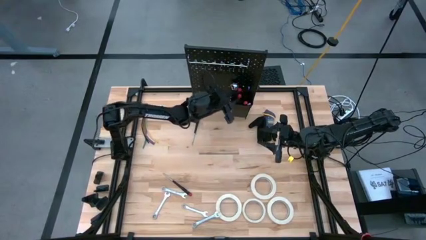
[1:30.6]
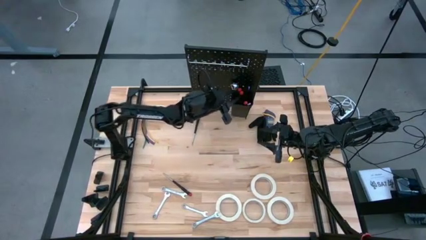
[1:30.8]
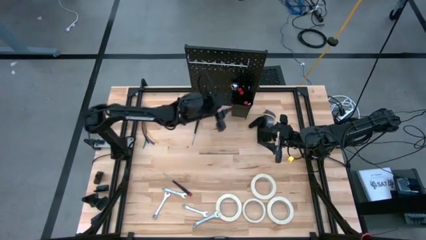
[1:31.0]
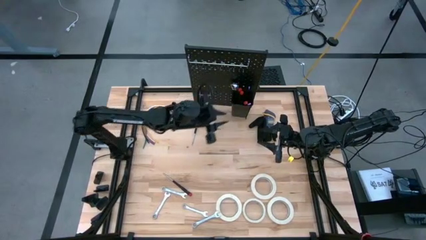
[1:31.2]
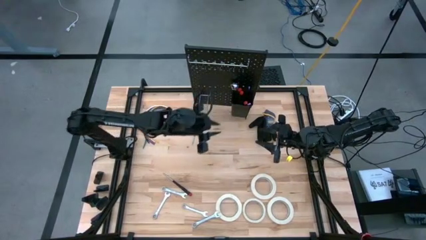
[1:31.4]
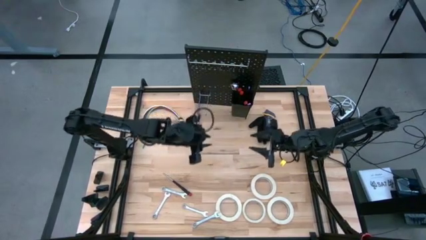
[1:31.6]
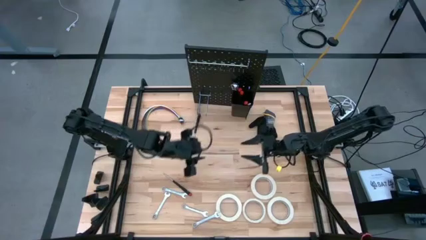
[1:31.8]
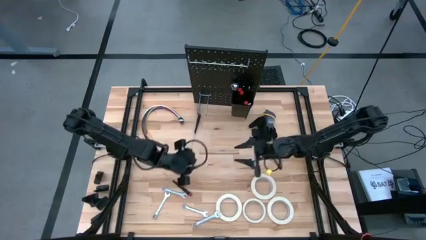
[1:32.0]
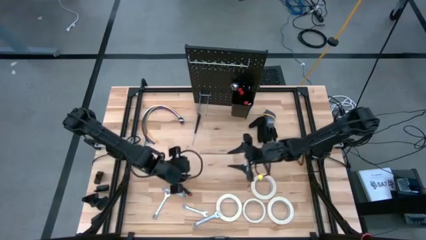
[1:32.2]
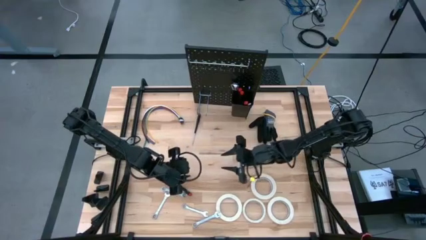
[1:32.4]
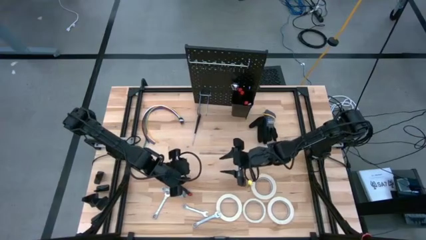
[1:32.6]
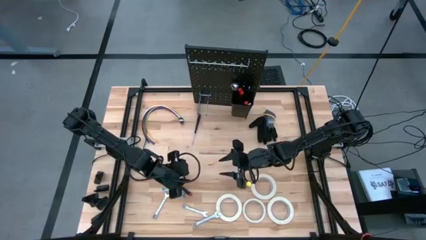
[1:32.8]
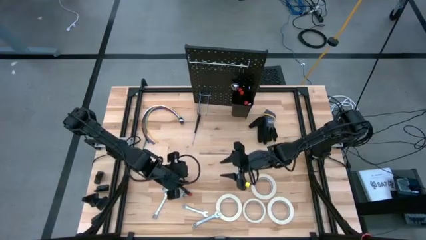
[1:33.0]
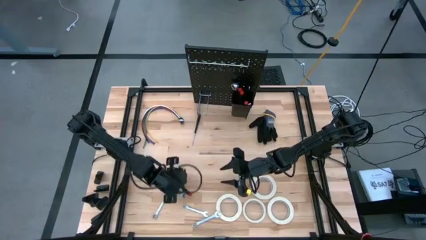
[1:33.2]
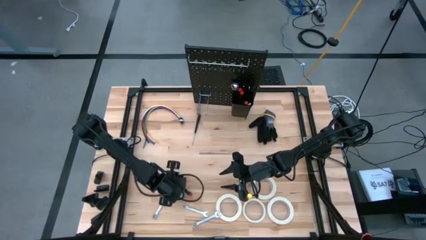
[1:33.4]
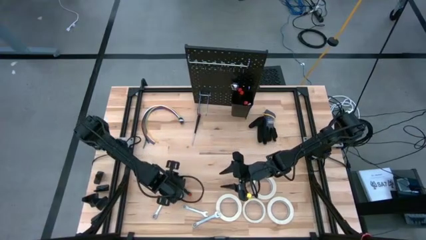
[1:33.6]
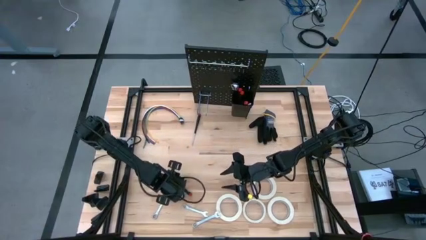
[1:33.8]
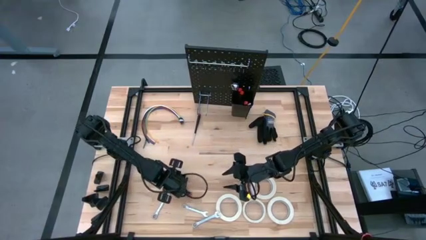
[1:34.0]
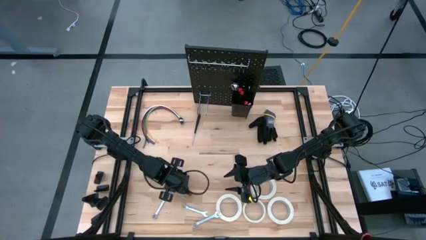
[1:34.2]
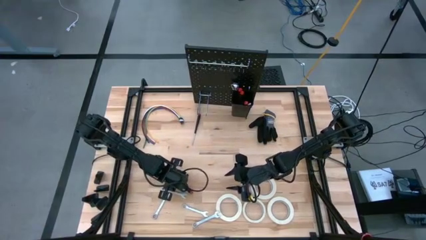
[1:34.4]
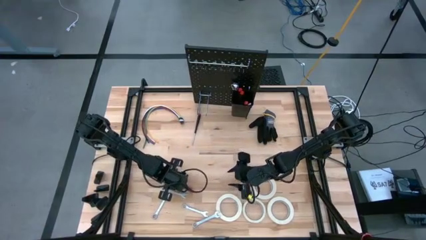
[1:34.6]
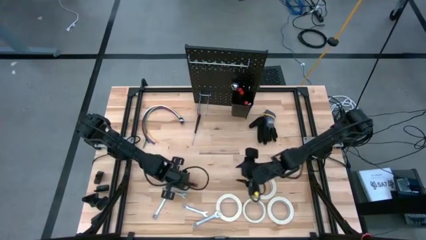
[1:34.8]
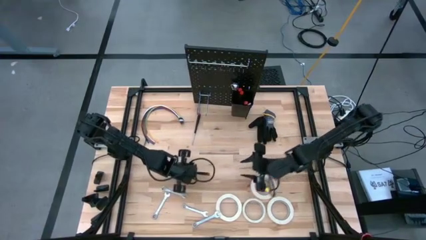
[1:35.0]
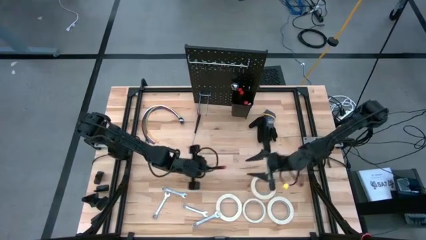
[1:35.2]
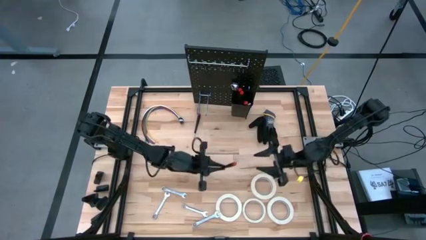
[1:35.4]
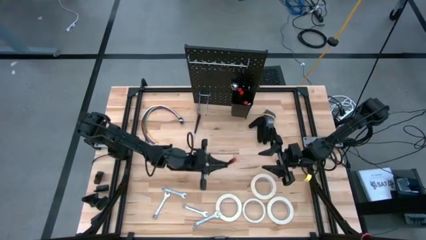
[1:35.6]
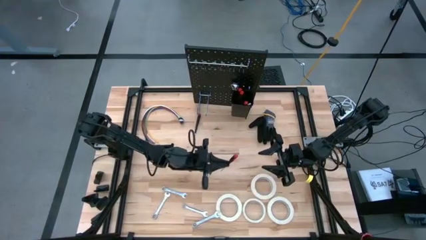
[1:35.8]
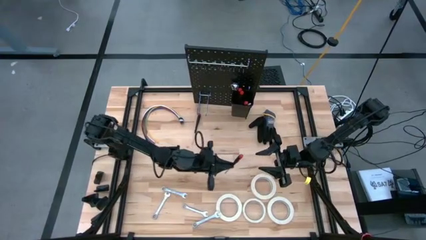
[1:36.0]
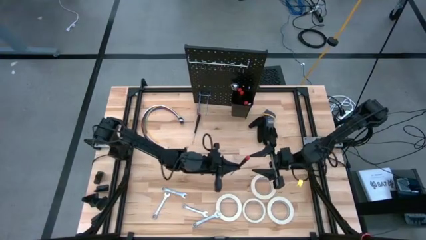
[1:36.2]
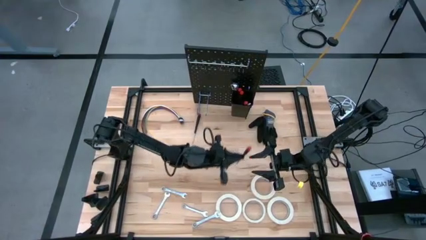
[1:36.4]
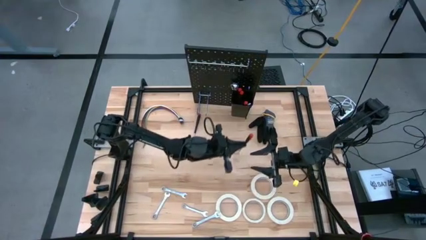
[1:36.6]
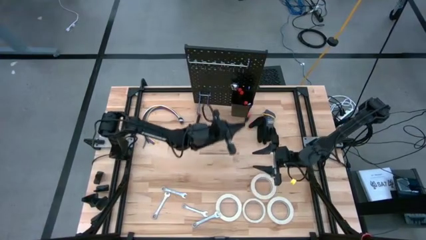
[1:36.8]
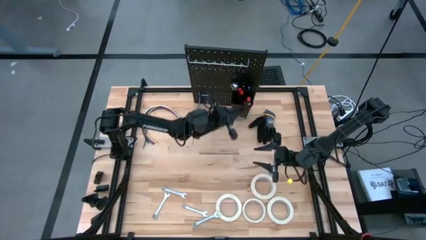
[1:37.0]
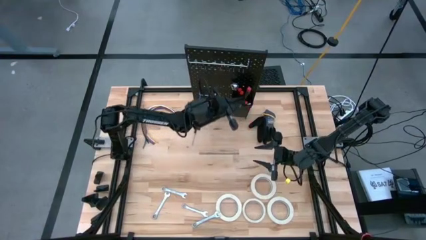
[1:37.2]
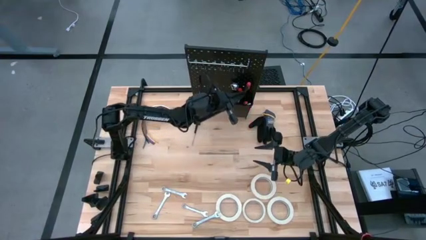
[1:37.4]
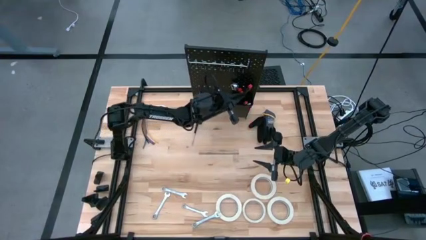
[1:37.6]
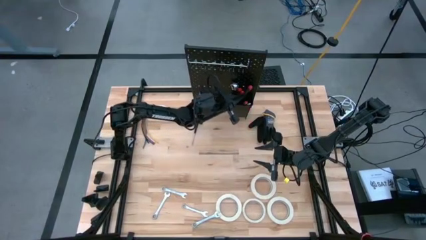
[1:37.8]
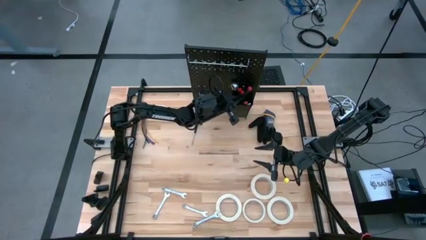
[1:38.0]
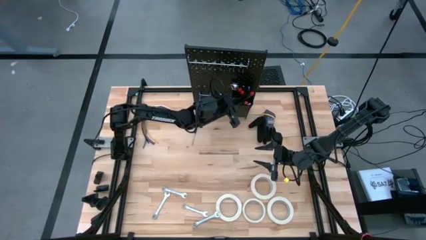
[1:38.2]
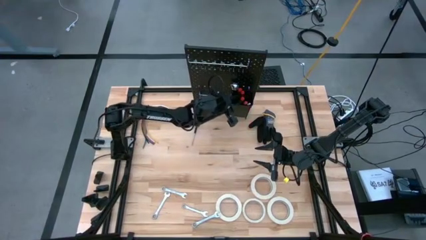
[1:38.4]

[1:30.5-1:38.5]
Task: Hang tools onto peg board
Put the black nut driver into the black bin on the peg board

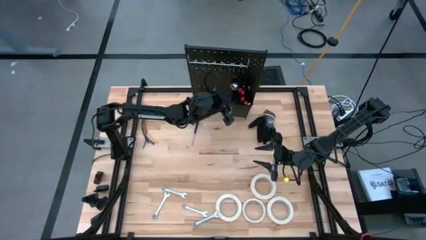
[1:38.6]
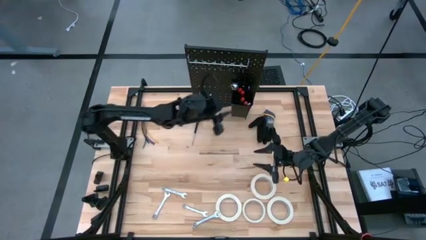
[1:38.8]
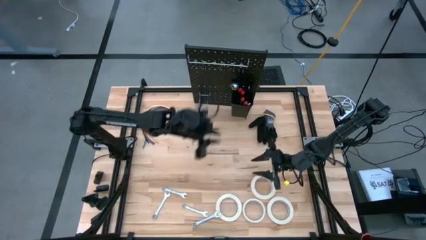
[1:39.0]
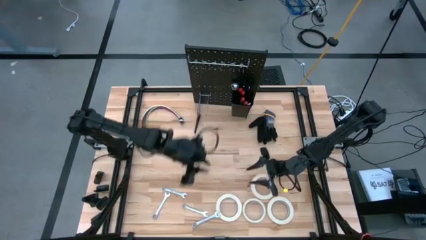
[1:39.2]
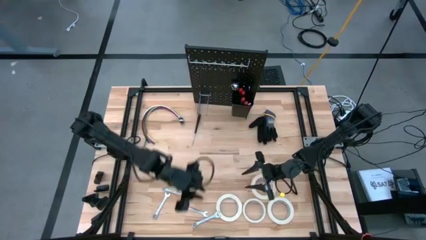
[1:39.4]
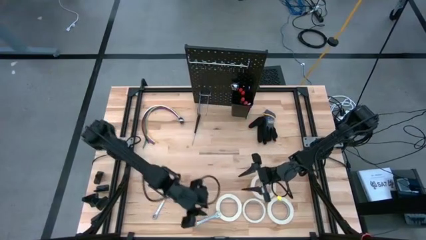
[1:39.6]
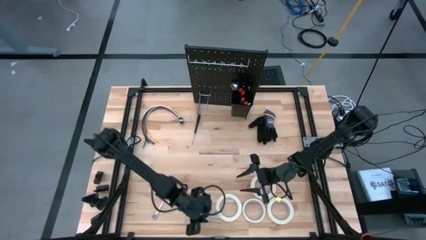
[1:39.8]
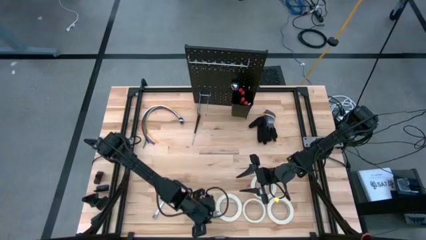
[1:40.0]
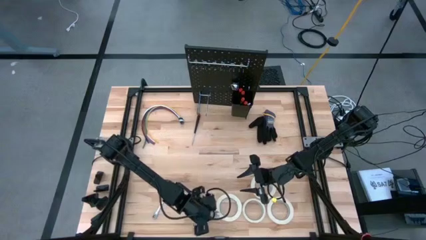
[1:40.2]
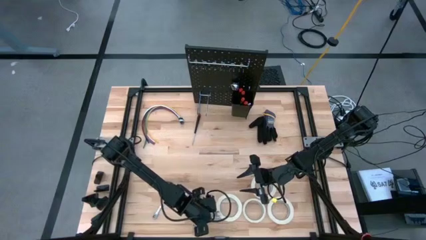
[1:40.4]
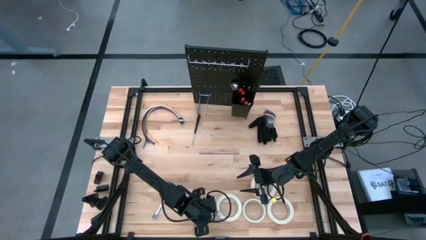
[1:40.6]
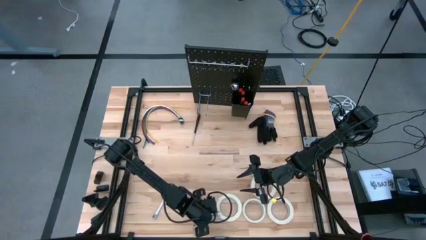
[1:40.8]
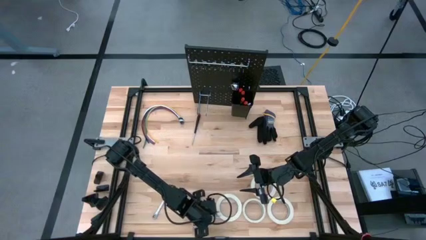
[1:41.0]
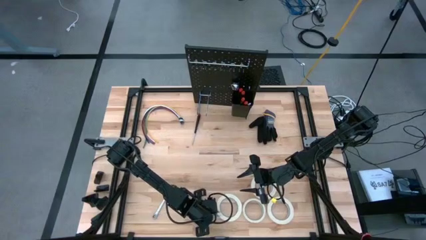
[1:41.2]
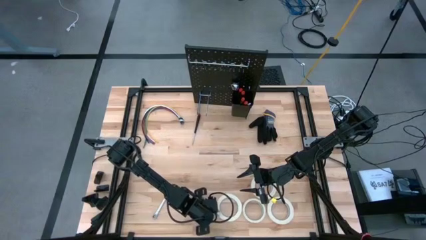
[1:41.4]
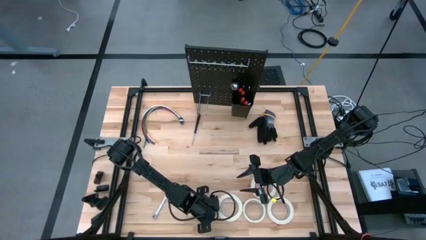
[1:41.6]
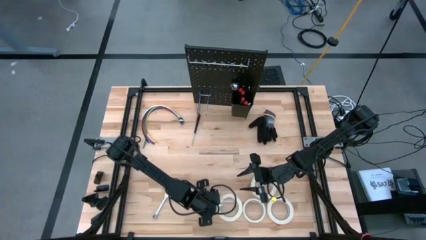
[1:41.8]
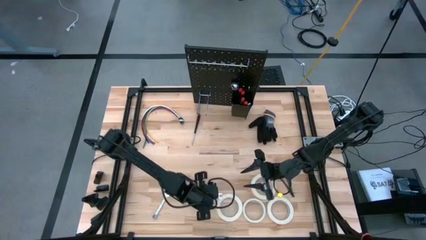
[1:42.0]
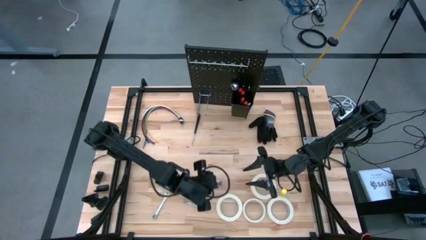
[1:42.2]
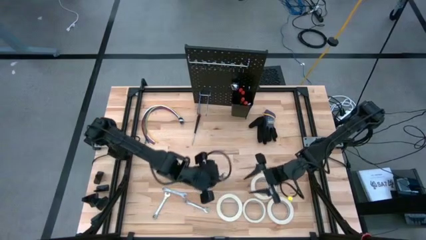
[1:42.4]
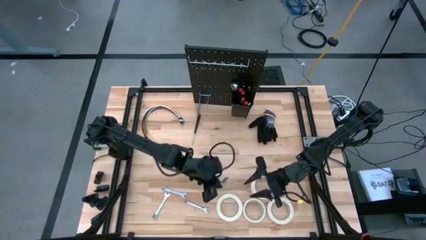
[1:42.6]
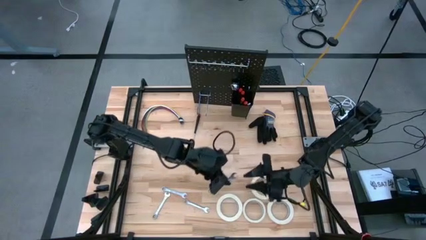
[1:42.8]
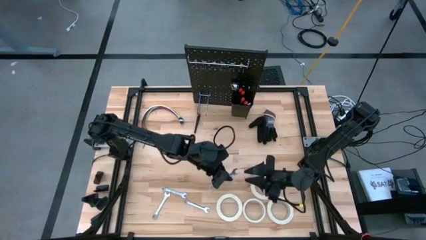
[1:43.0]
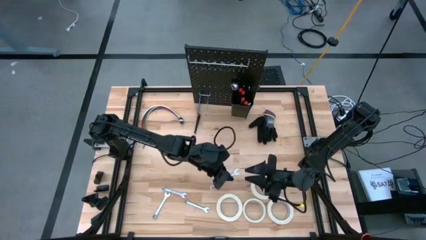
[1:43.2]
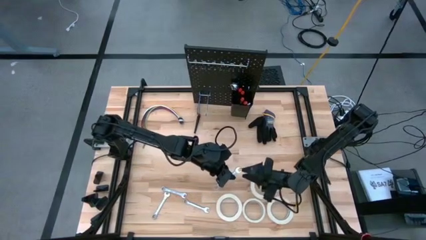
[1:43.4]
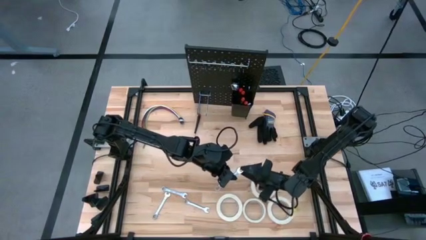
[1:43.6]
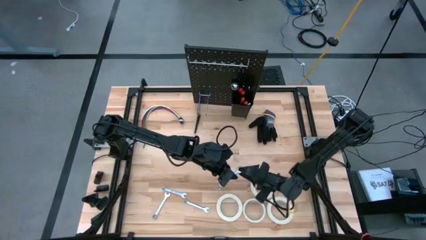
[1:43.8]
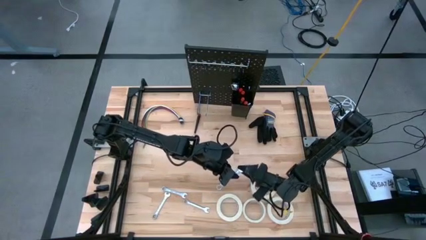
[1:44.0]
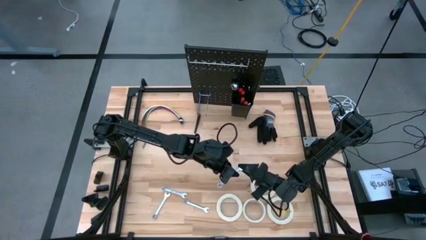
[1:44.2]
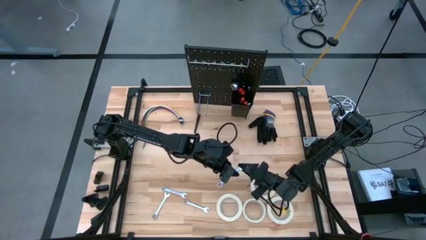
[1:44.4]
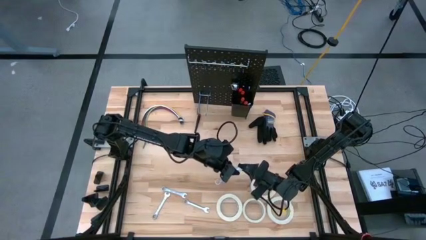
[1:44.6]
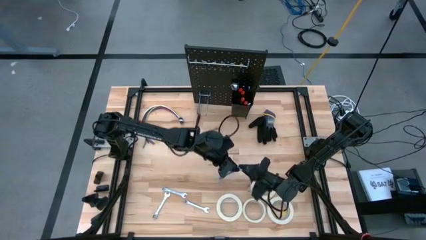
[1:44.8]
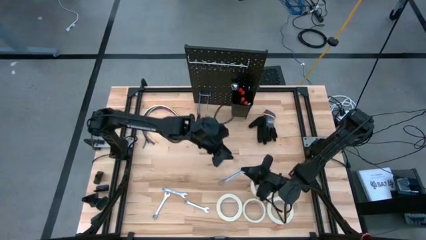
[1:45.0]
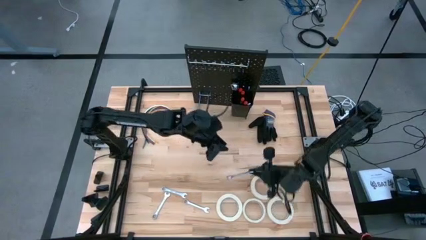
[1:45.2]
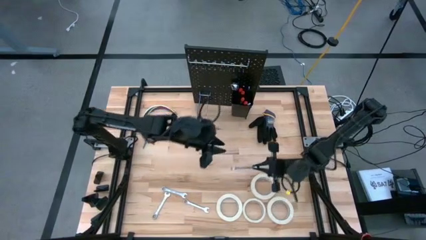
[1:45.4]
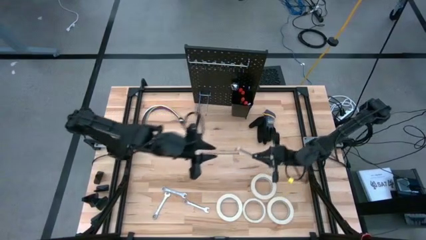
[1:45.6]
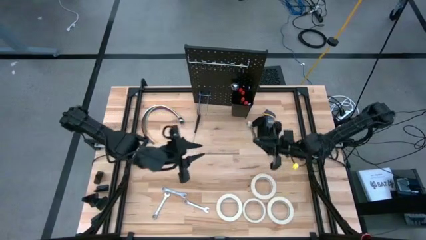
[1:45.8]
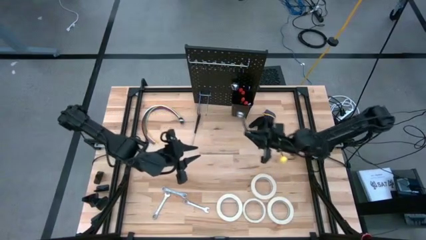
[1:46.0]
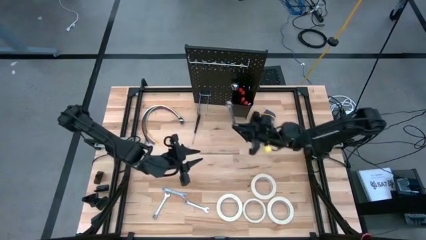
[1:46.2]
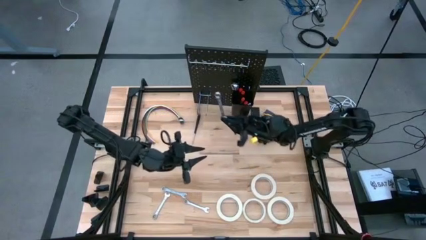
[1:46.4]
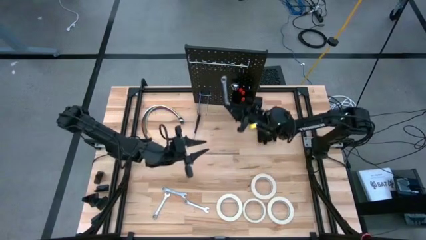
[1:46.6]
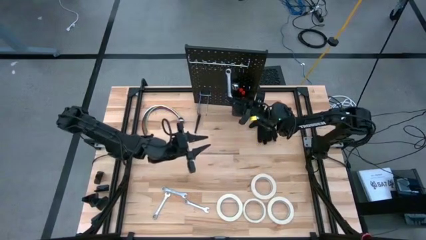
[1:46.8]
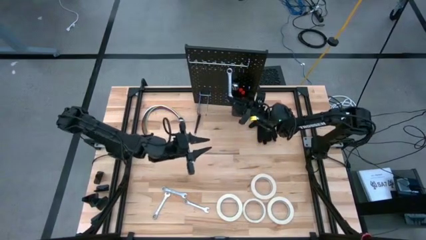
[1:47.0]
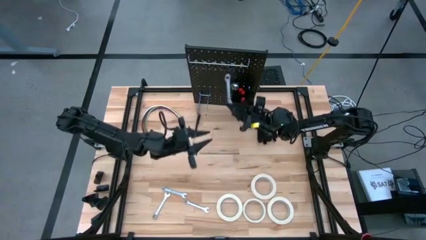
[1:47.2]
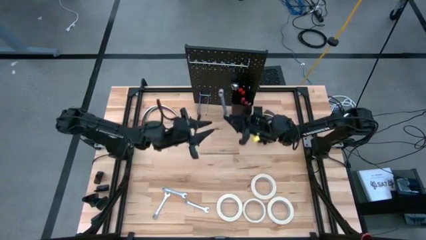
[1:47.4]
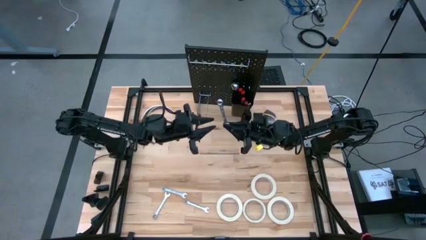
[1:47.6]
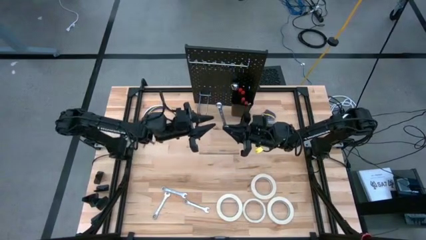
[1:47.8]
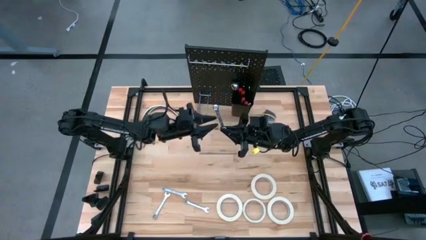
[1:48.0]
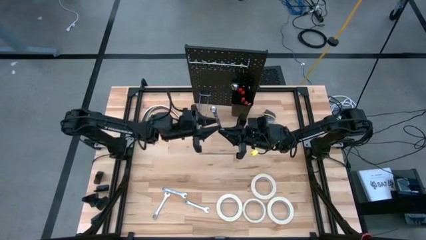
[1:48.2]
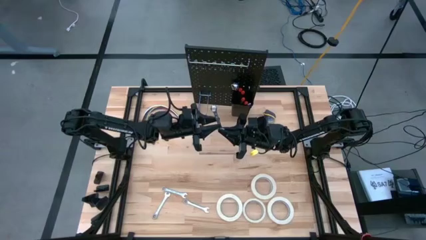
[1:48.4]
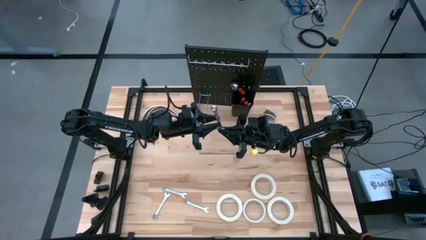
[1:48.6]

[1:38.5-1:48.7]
Hang the silver wrench on the peg board
